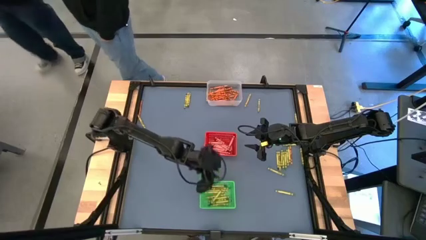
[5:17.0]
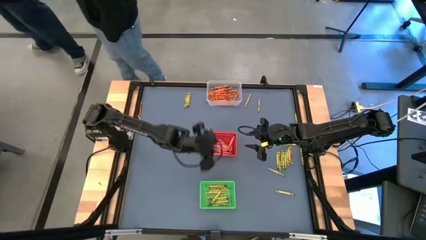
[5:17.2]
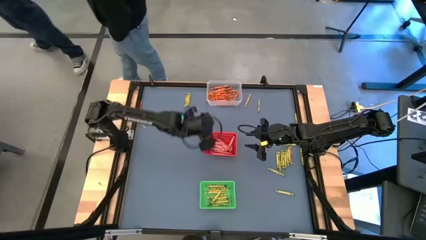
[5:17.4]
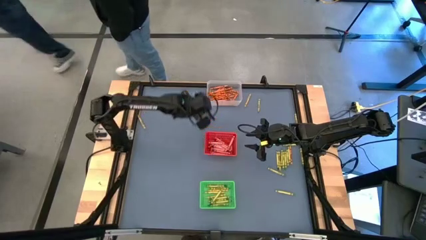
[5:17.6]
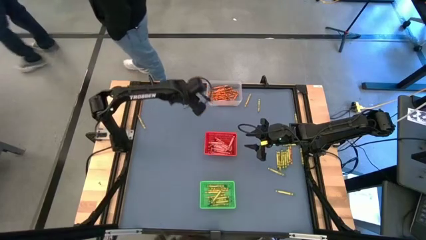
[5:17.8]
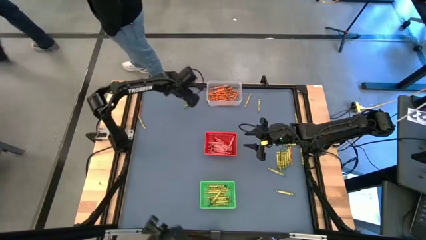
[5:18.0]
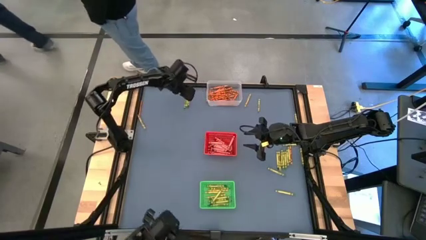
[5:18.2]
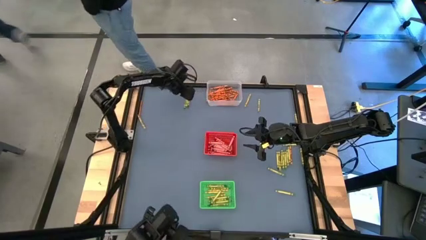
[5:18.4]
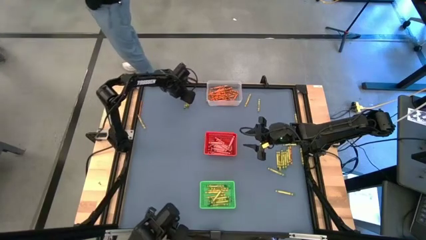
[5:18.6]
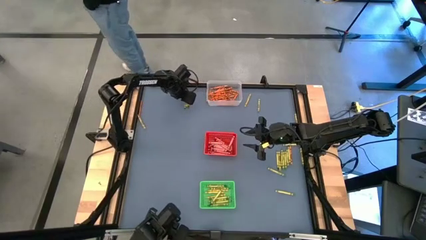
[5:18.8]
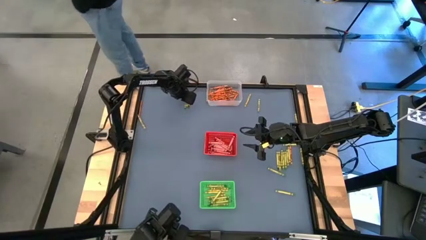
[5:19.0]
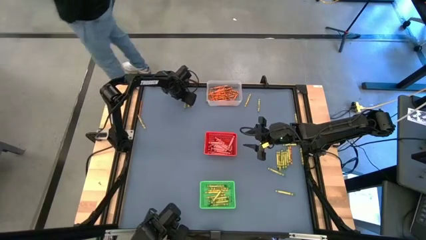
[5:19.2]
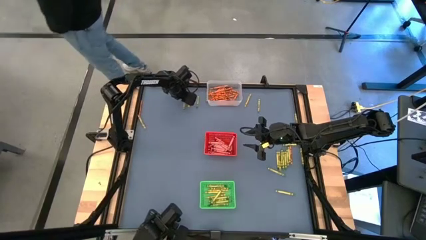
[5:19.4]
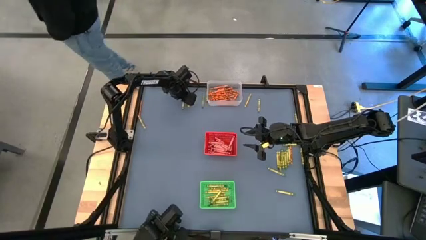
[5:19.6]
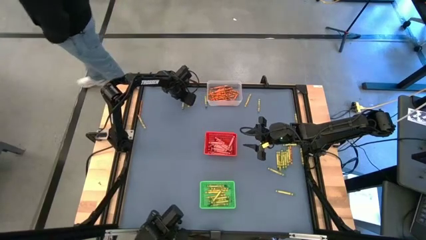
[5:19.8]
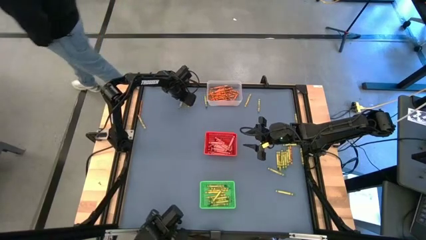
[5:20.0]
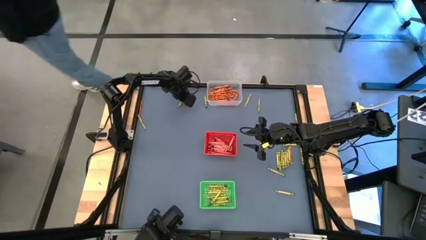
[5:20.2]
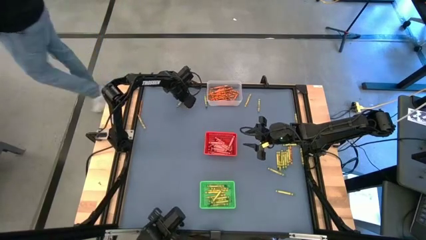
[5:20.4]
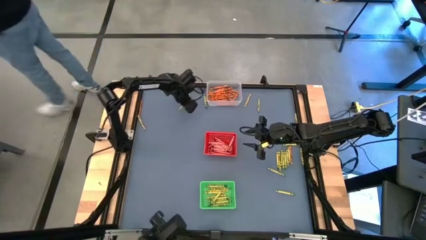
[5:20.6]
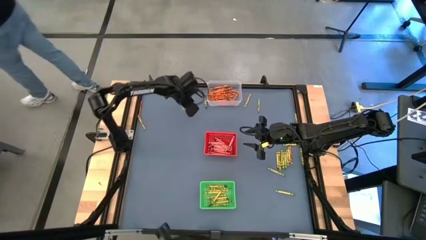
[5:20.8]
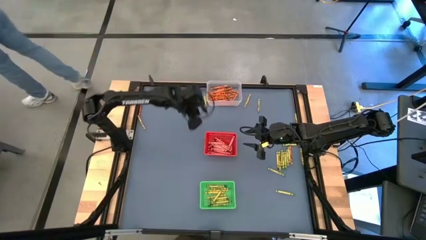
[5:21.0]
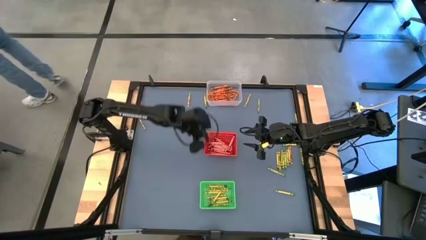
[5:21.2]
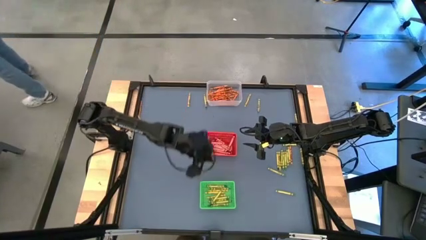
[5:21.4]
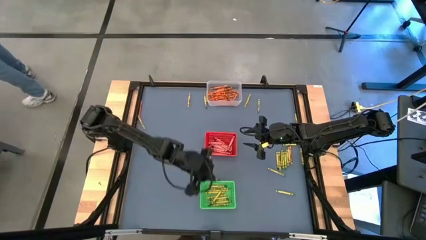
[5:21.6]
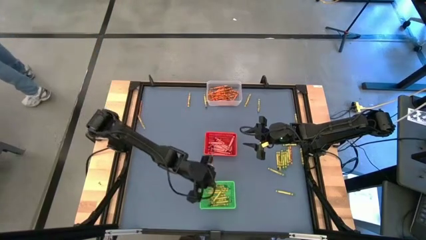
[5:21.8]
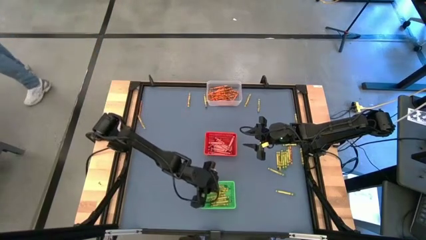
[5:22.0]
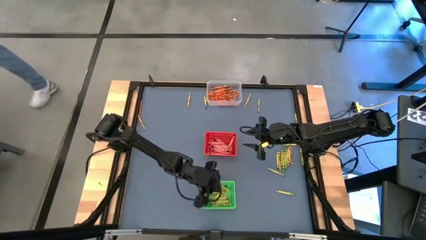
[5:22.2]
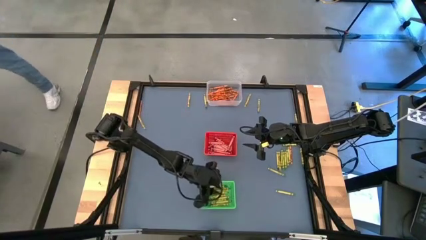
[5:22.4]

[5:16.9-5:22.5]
Task: Sort crayons
Put the green crayon into the green bin

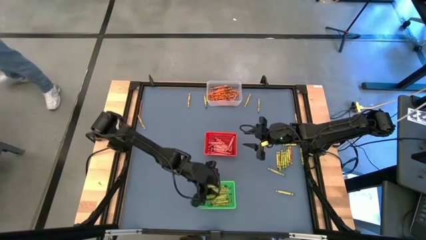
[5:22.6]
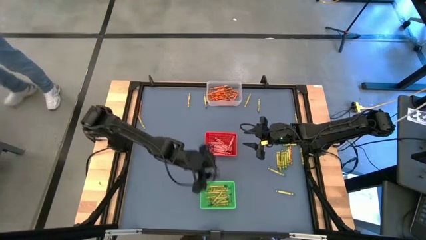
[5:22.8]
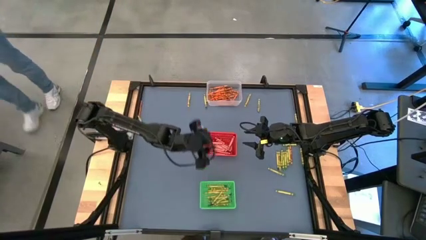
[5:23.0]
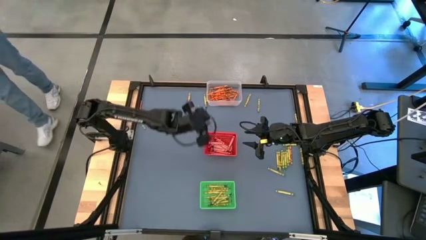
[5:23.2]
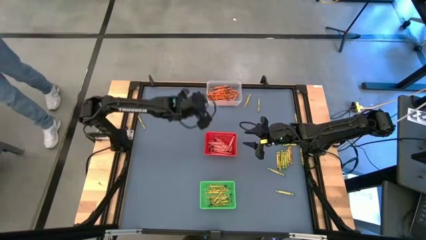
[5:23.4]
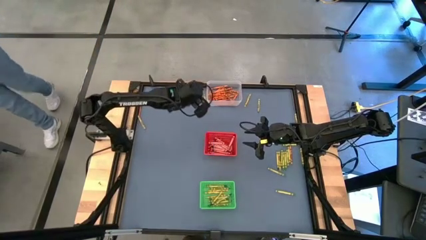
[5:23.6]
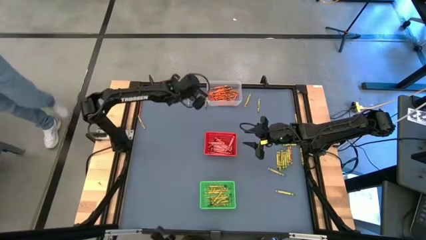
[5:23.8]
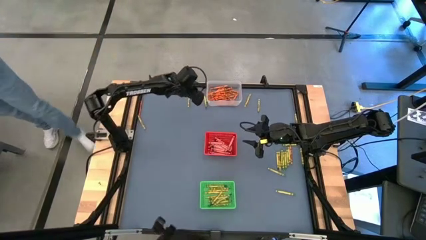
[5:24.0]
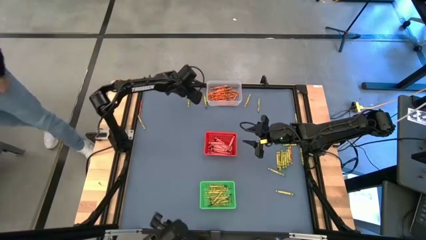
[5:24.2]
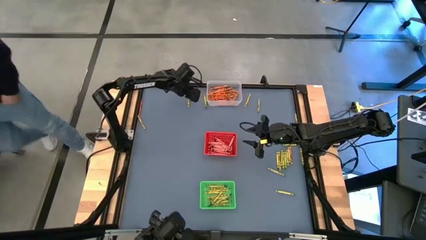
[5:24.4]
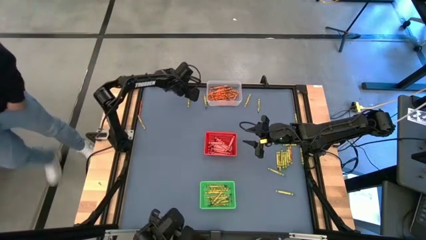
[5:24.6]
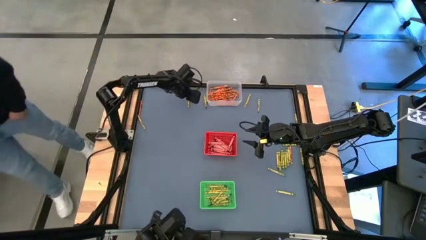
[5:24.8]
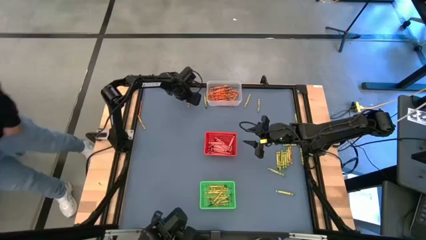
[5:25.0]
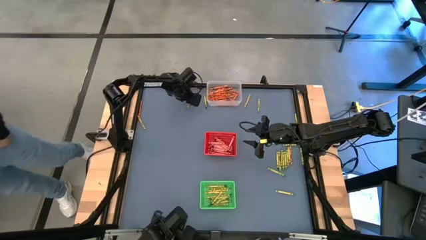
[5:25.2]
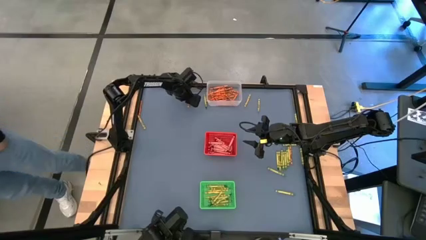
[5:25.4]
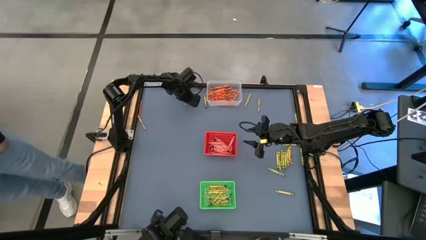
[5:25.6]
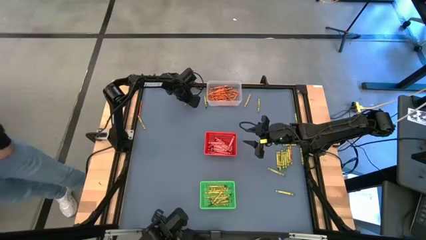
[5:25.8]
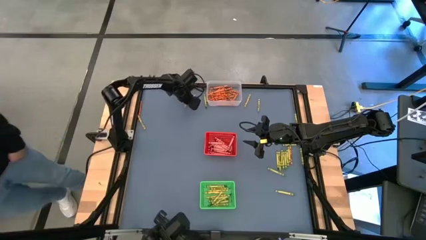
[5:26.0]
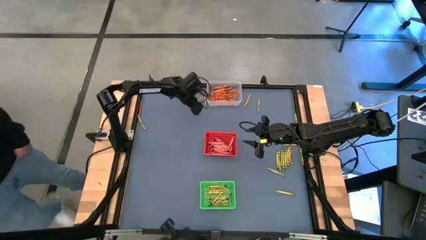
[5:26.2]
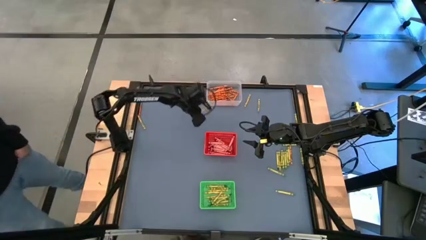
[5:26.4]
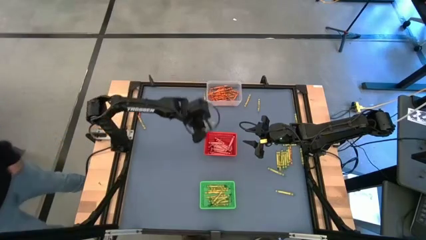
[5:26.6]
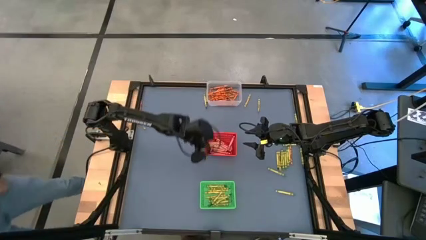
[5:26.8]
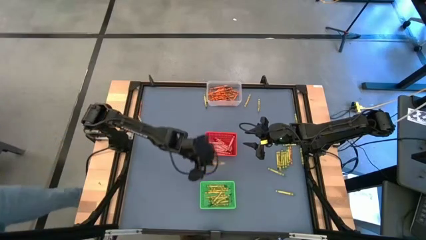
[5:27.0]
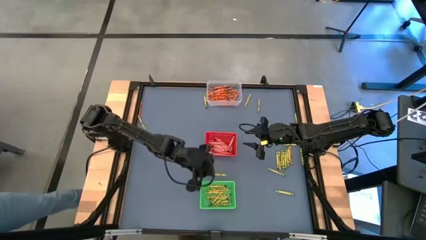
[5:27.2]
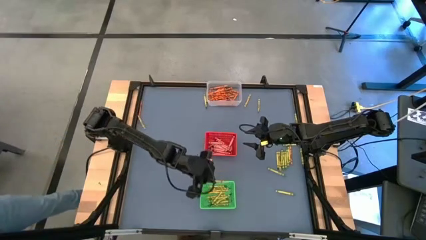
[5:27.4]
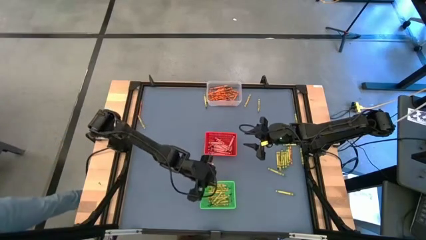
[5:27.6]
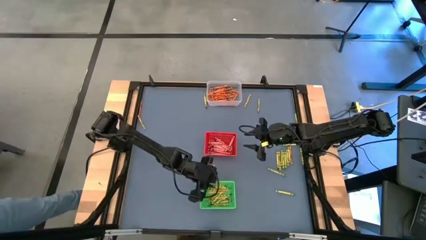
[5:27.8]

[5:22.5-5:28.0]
Put the yellow crayon into the green bin

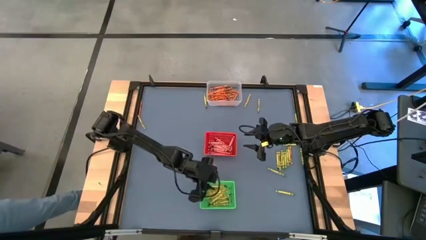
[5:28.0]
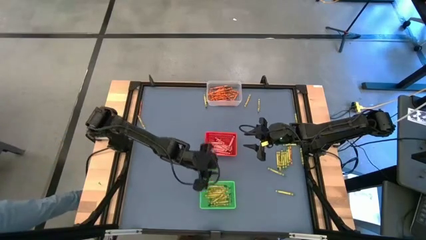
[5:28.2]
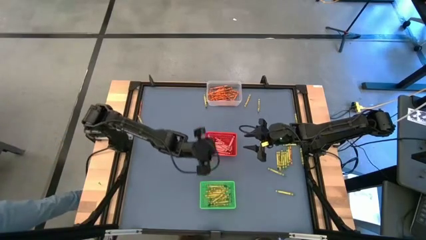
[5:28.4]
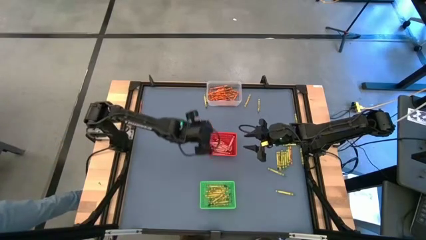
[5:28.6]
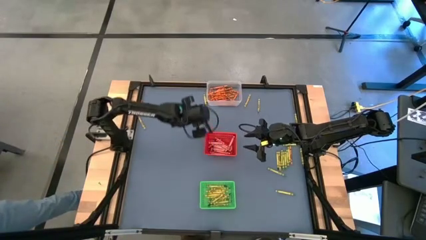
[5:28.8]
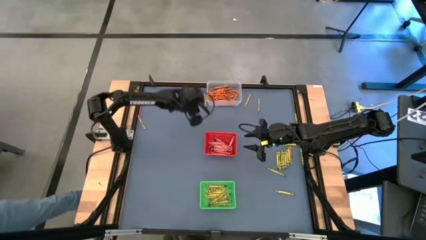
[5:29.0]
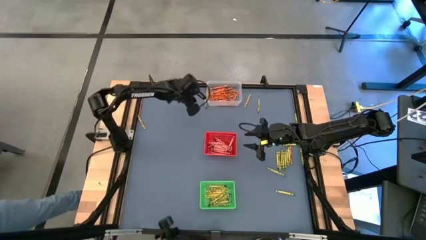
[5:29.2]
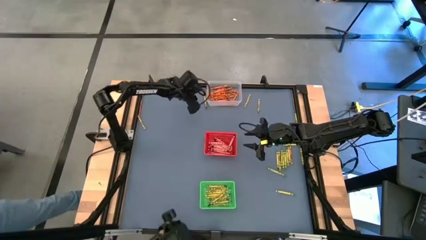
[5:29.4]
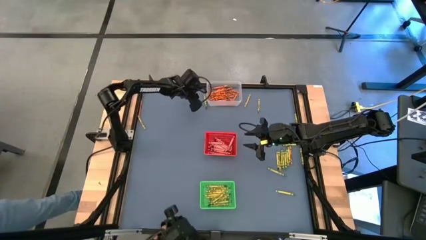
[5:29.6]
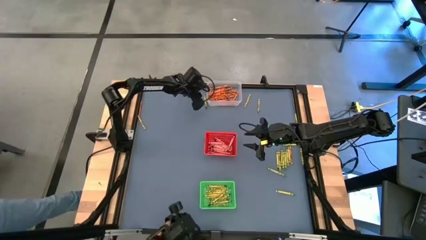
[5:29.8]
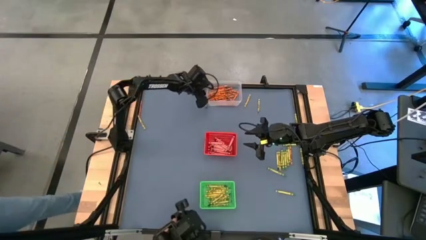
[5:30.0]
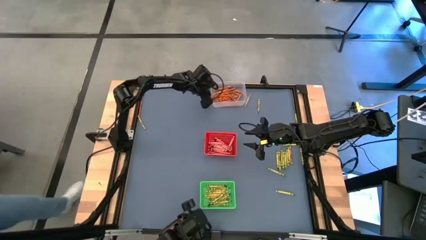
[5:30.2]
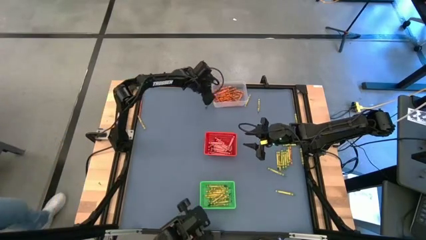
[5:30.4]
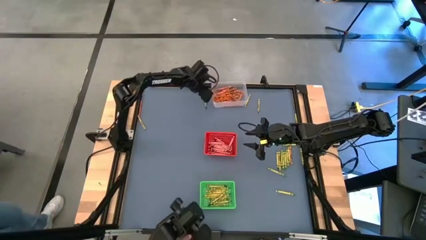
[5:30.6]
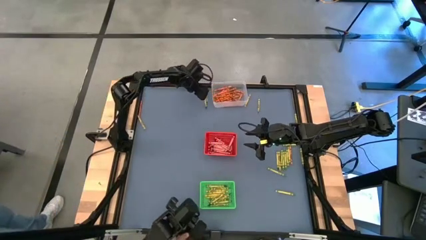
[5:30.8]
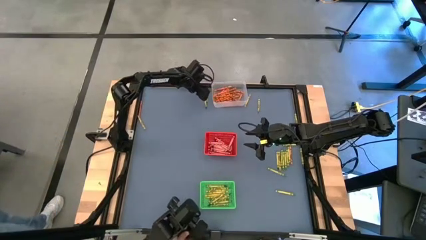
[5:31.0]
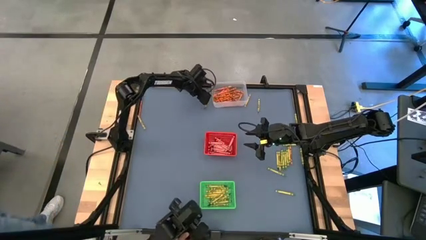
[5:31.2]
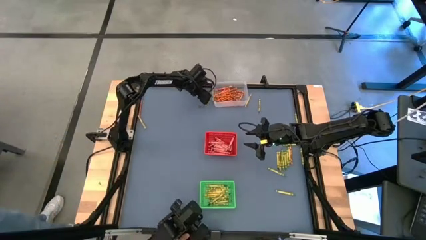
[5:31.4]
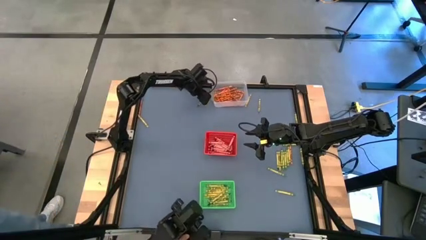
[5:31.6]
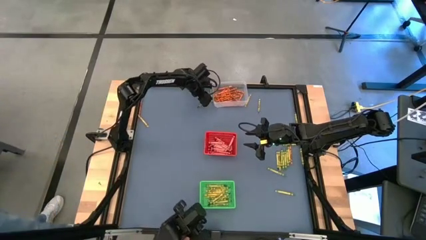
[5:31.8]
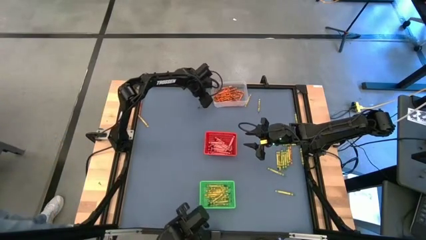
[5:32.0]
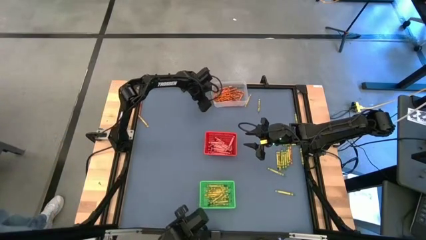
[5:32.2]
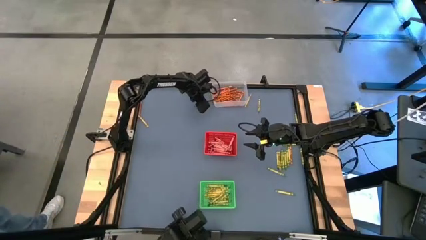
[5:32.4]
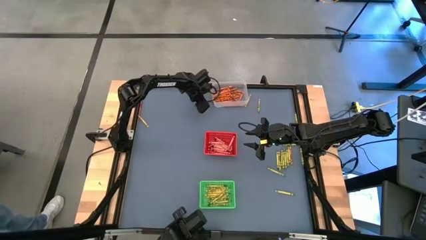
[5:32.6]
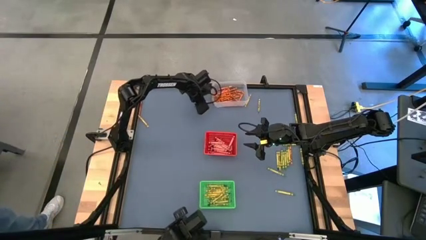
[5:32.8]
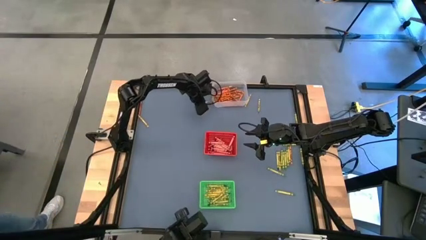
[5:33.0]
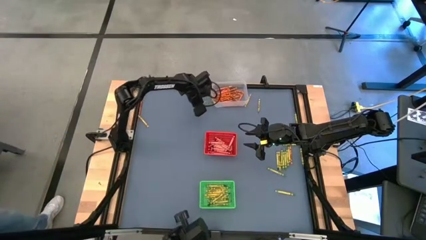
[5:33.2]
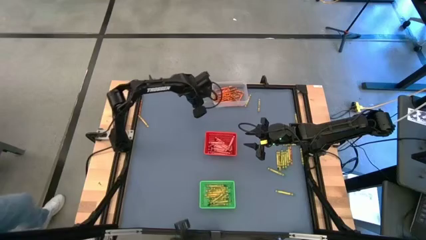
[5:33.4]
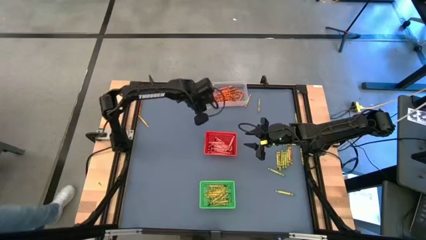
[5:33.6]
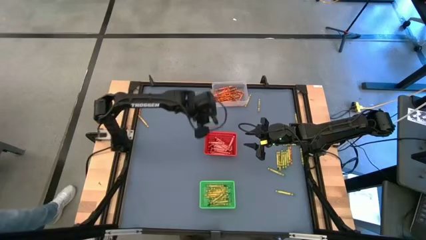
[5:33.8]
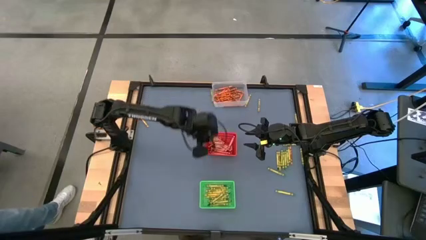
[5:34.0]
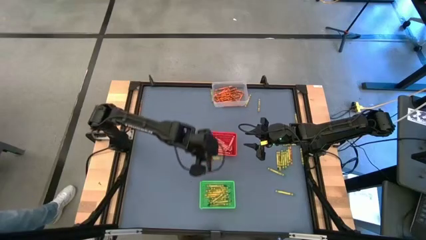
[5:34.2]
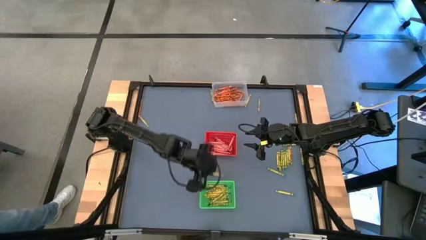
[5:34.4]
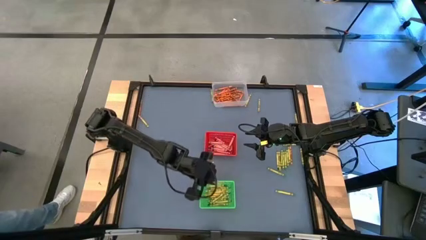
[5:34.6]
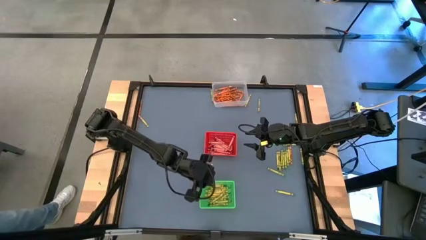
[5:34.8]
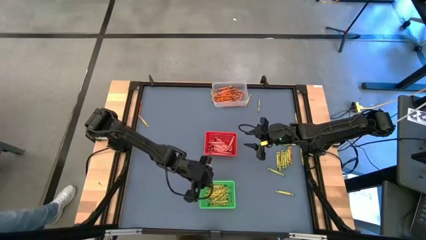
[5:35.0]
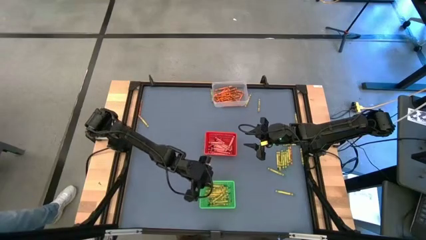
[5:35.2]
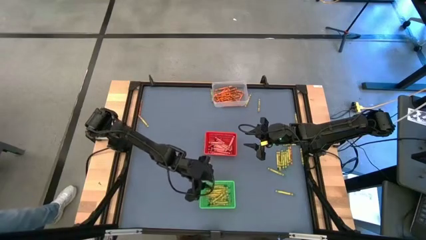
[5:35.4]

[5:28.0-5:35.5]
Put the green crayon into the green bin
